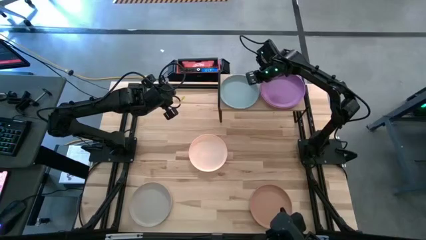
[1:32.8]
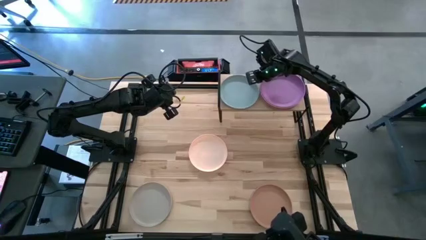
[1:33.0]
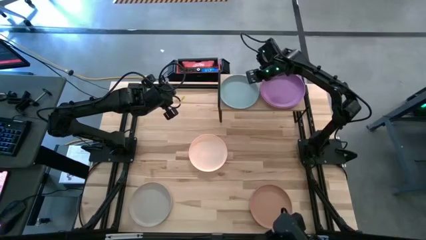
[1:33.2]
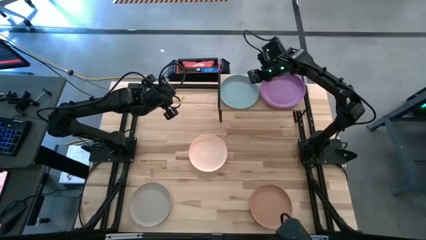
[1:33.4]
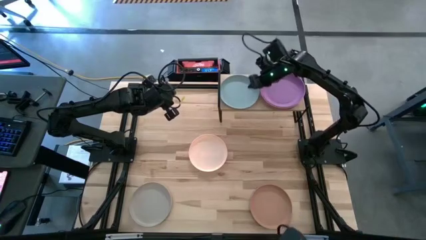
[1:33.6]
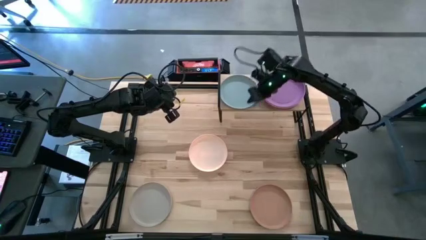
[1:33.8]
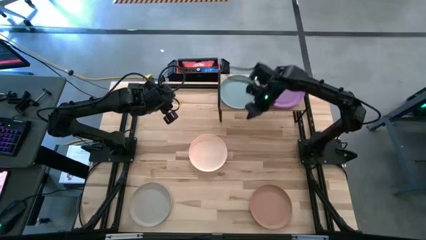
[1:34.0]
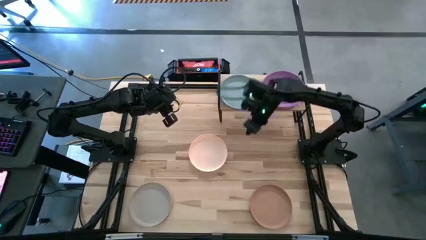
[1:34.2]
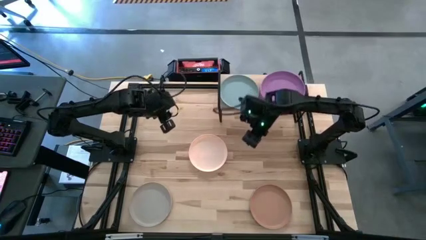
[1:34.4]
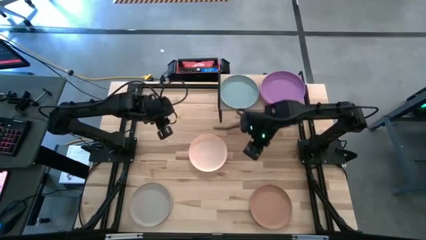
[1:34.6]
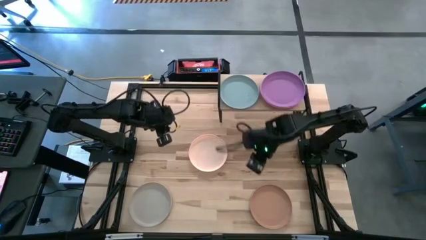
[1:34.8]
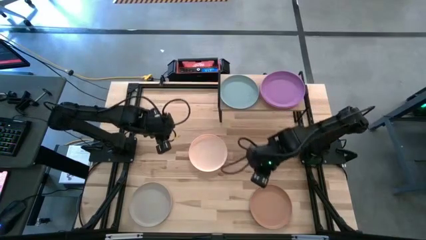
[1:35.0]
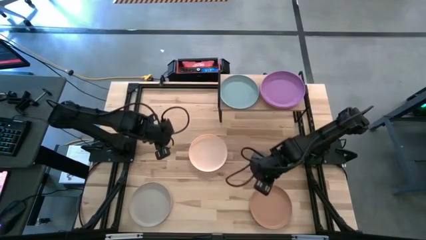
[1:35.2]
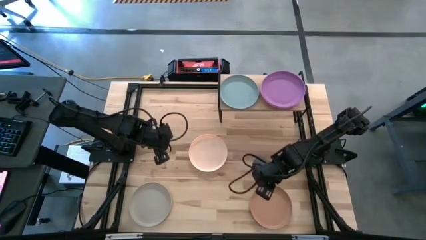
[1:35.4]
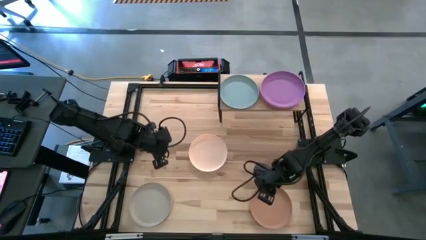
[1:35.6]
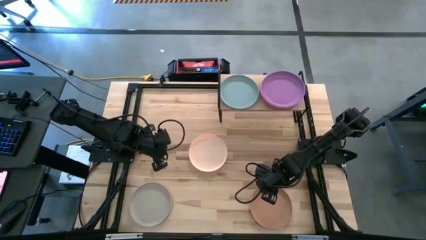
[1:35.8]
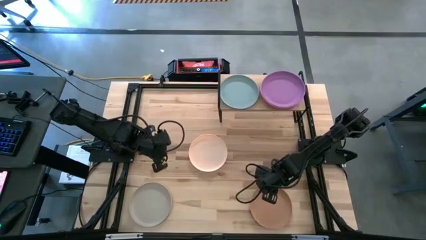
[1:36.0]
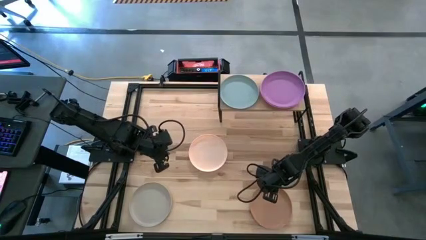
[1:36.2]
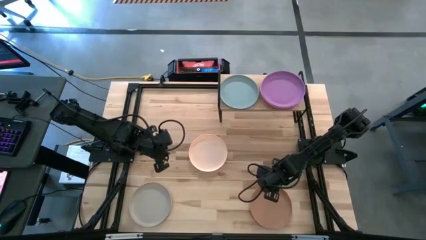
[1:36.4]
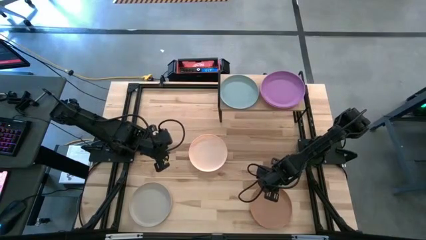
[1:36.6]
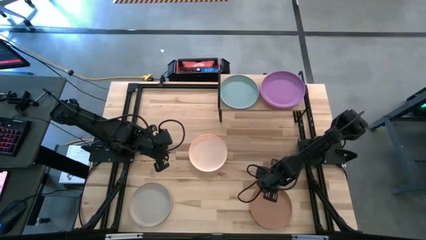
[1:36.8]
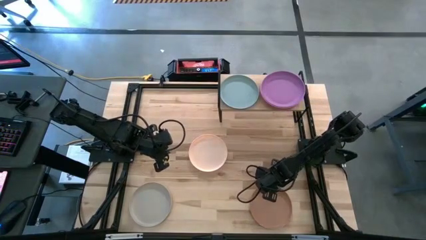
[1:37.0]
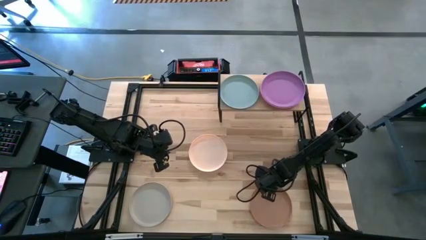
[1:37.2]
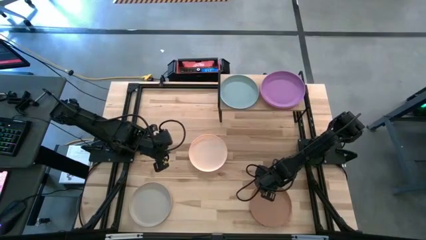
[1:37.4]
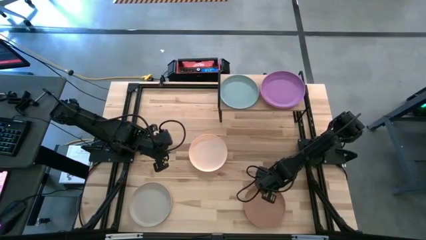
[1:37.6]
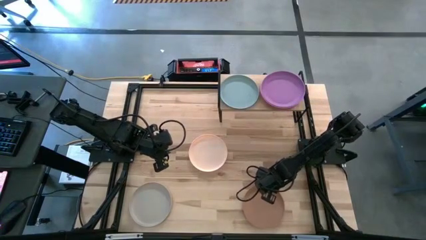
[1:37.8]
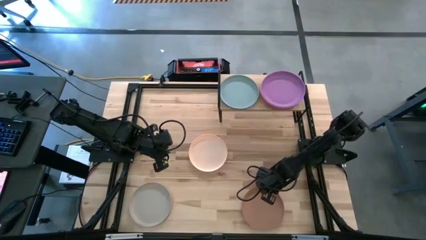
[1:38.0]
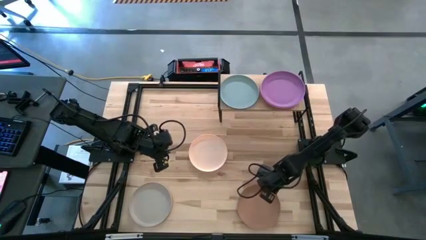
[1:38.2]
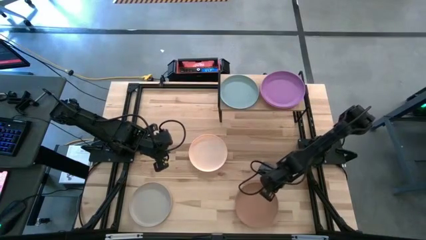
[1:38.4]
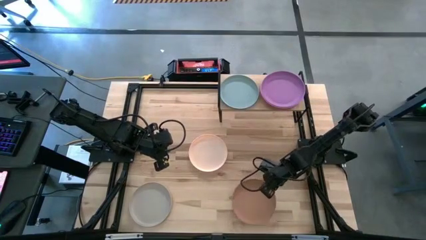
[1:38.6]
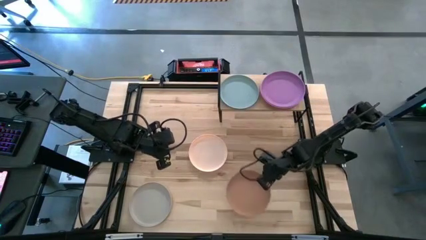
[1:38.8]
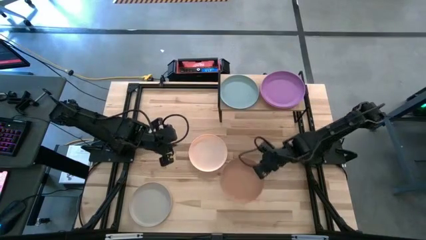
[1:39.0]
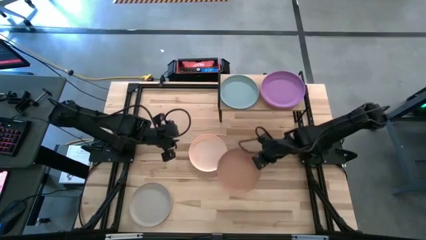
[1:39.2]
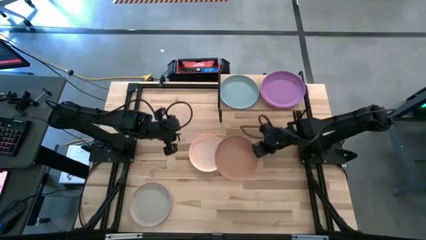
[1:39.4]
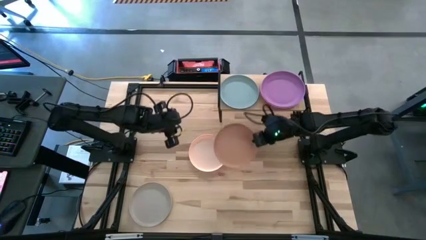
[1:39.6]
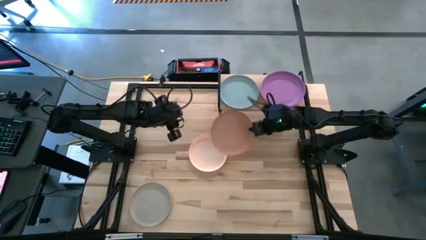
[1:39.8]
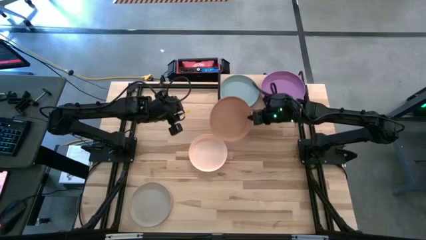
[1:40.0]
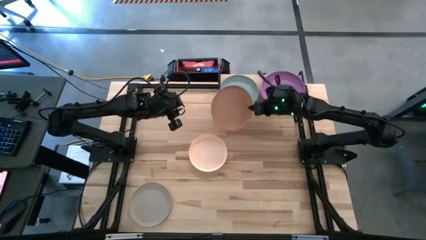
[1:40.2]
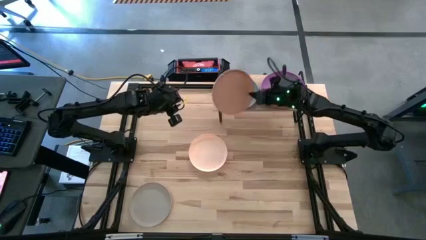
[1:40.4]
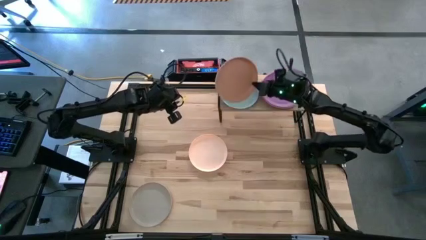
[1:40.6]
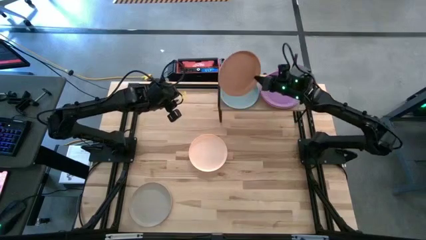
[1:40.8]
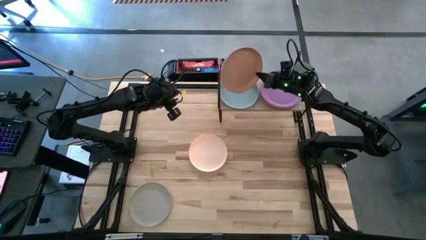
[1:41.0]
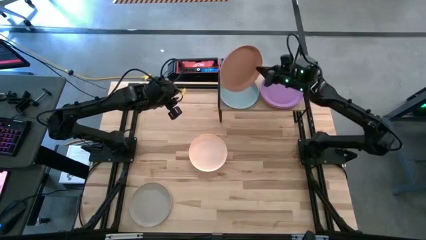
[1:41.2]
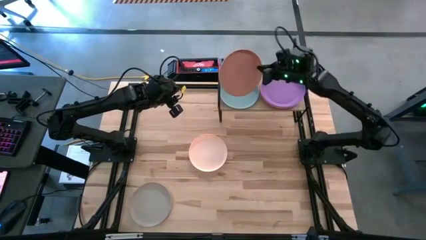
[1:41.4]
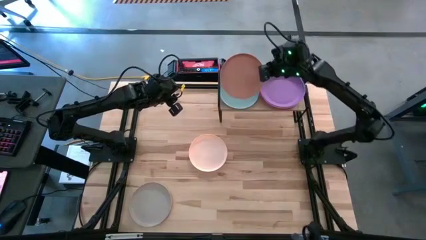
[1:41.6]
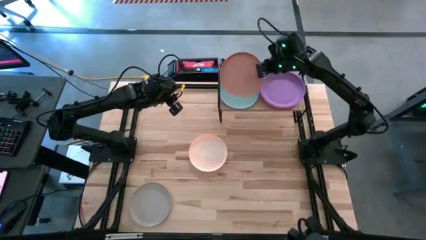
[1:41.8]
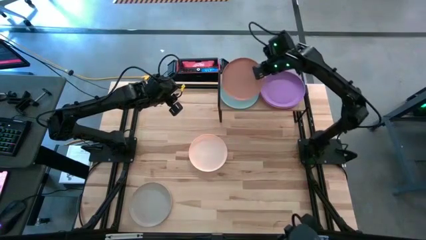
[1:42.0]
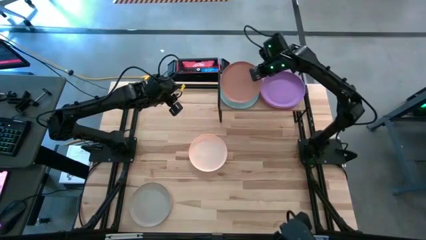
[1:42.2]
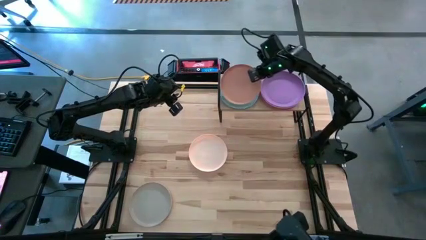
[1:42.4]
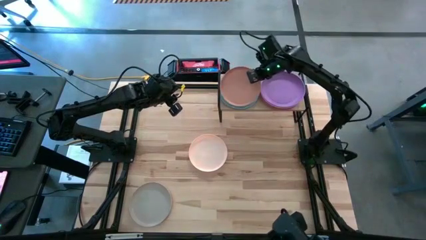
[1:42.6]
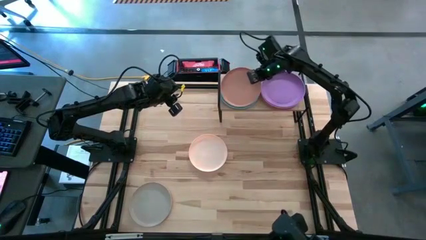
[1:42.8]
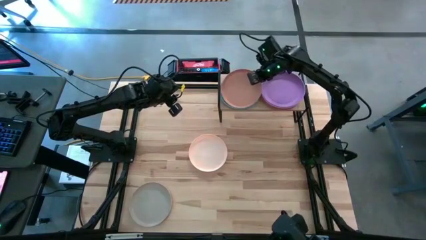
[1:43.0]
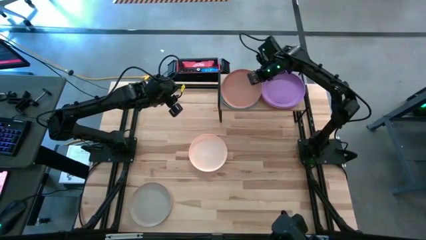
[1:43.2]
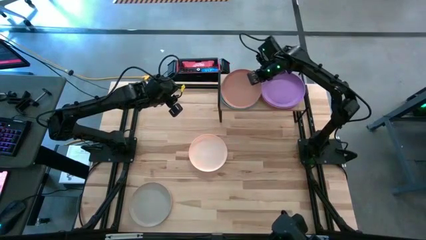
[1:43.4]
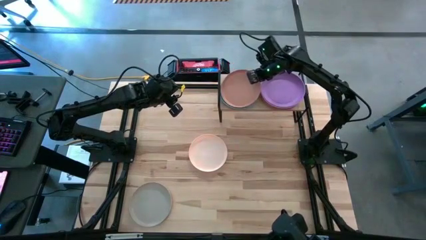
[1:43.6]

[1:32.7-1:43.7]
Task: Place and stack plates onto a shelf
Stack the brown plate on top of the light blue plate on the shelf
